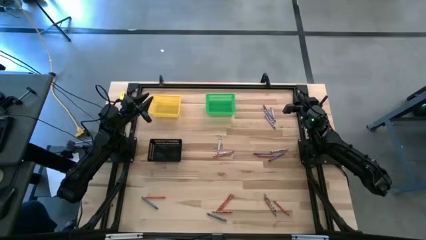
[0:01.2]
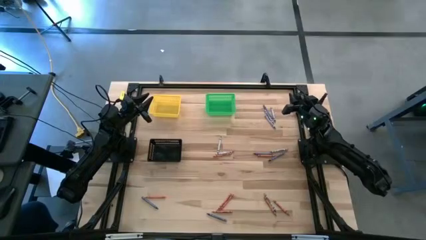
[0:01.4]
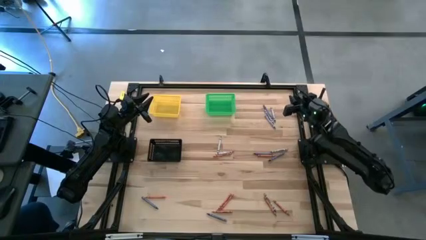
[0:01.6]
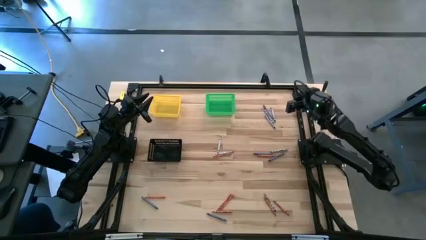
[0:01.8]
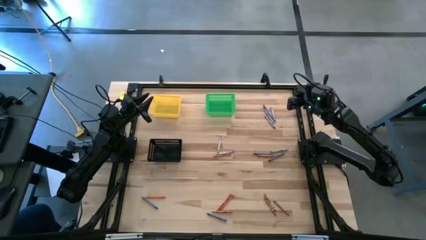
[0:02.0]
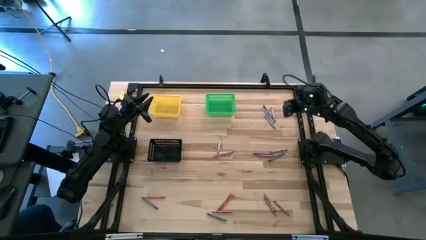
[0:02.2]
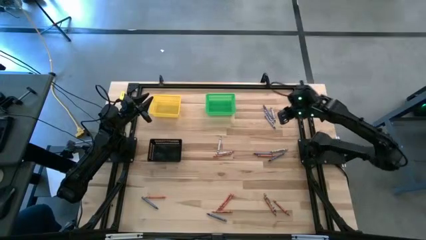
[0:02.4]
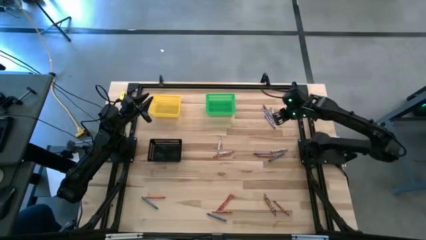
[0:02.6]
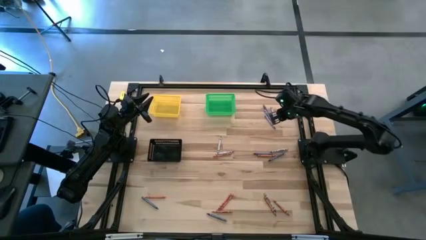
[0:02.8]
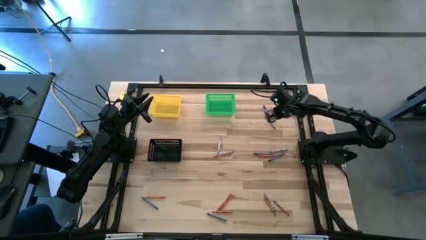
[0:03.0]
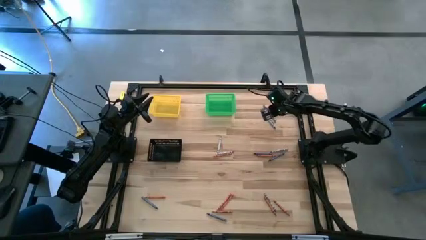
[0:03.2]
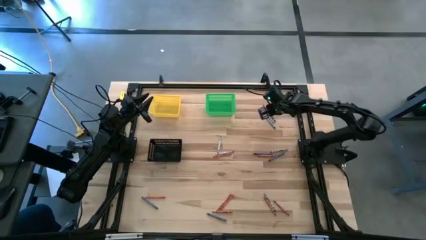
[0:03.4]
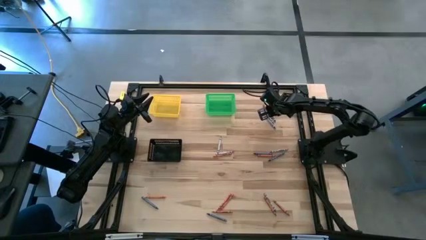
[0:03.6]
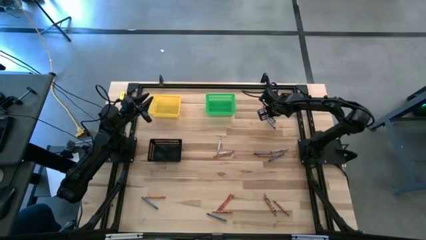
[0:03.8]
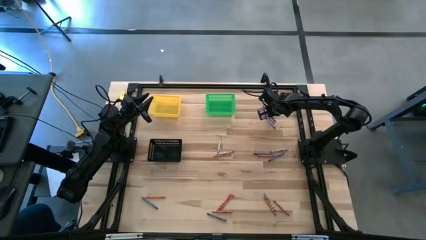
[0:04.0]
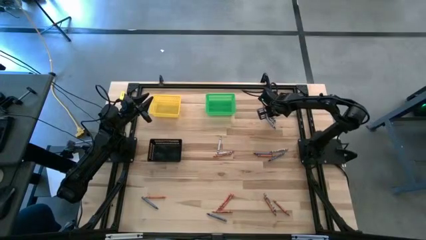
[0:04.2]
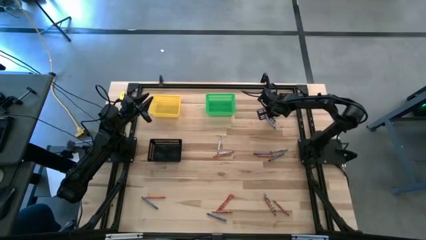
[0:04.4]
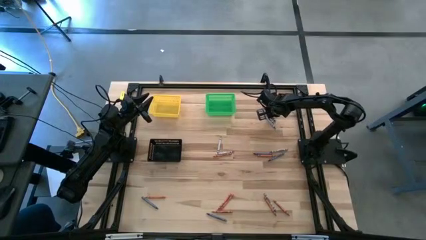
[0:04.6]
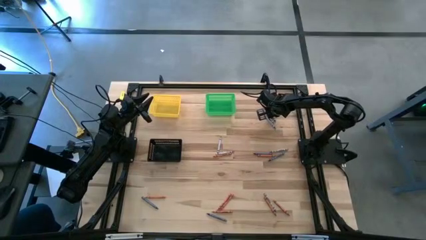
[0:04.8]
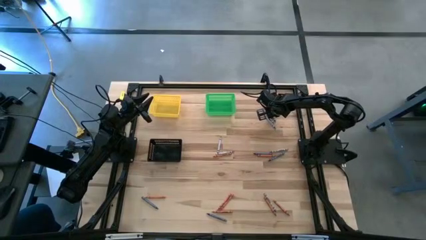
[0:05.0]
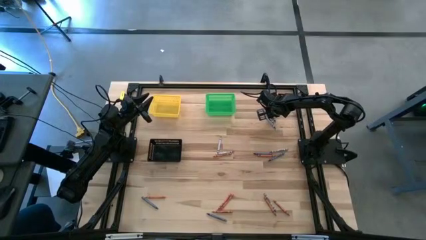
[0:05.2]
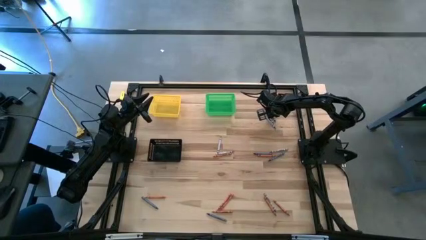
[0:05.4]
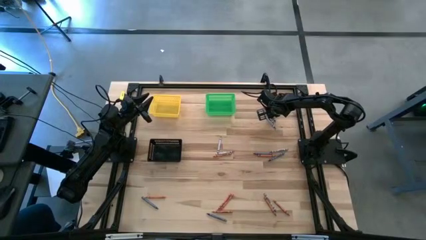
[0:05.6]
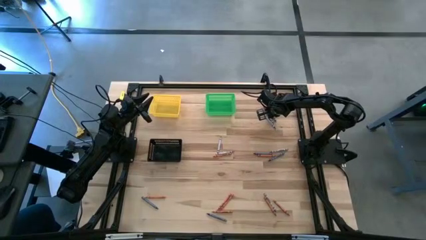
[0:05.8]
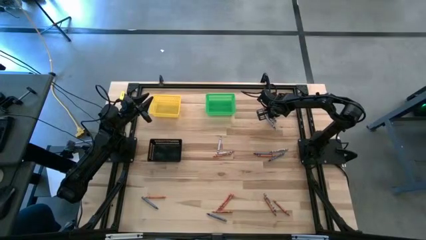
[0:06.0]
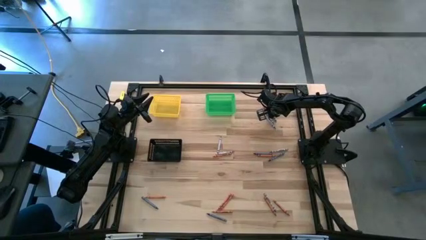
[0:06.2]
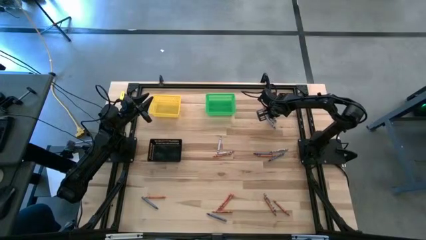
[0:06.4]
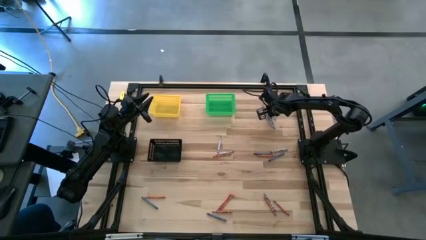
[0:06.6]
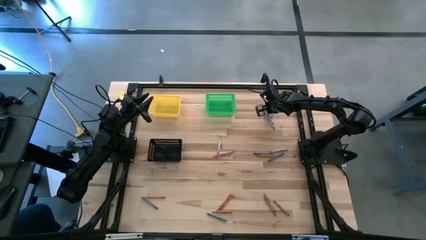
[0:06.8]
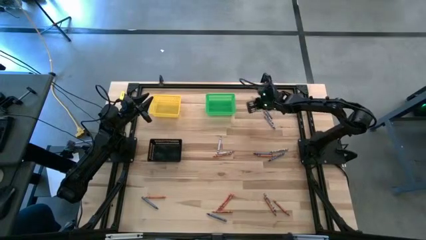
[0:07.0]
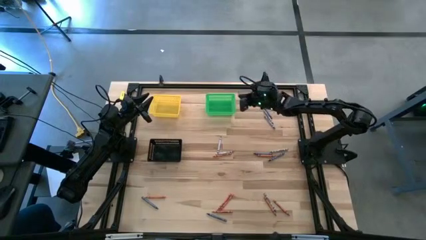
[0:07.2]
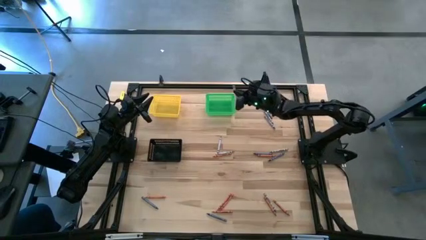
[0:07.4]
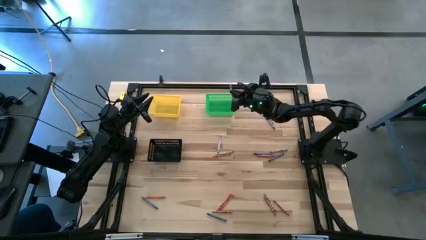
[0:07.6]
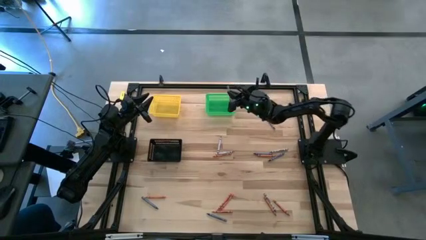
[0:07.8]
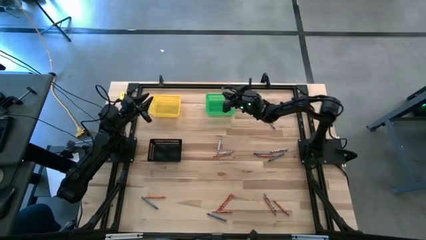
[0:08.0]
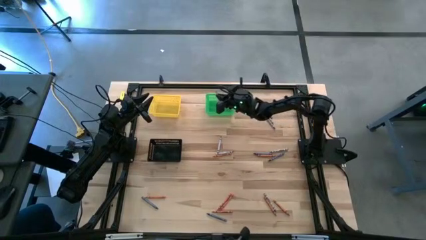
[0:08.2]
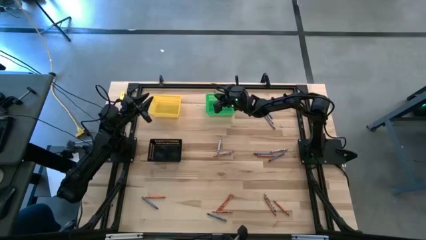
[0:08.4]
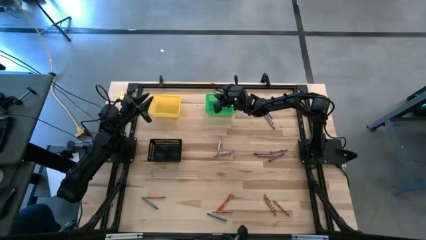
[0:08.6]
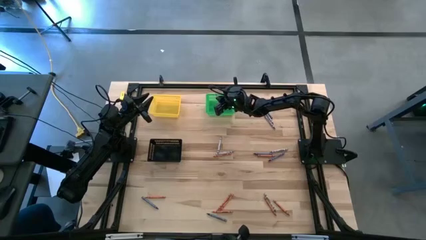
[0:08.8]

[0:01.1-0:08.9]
Task: Sort crayons
Put the gray crayon into the green bin

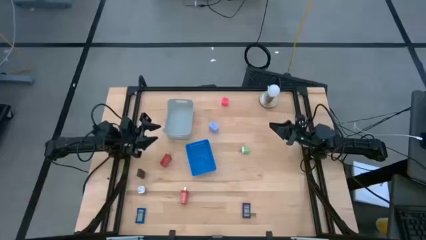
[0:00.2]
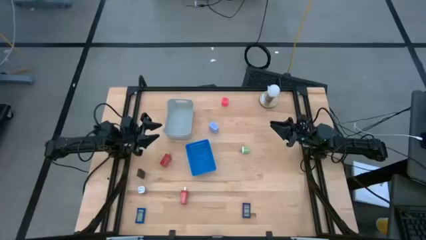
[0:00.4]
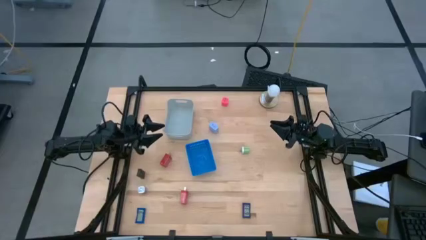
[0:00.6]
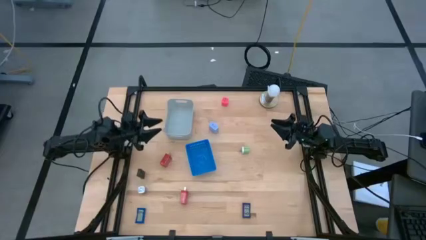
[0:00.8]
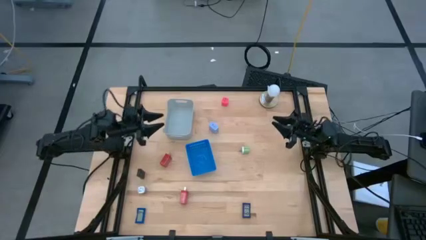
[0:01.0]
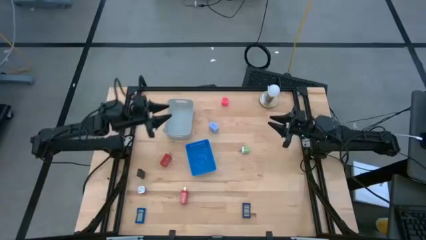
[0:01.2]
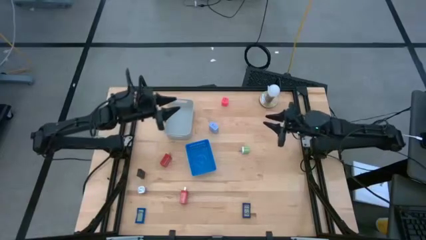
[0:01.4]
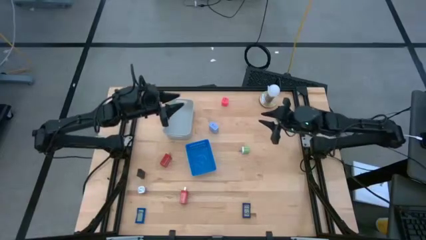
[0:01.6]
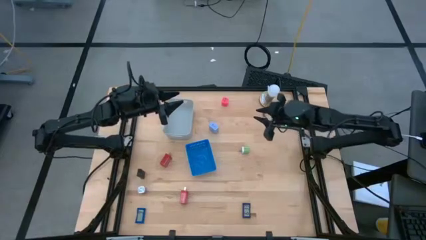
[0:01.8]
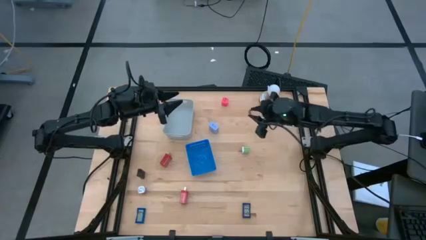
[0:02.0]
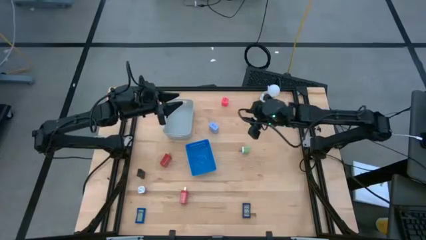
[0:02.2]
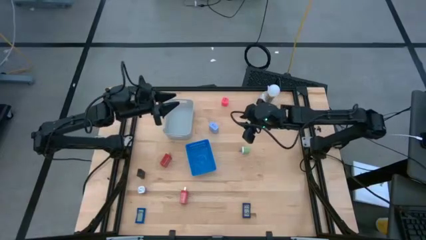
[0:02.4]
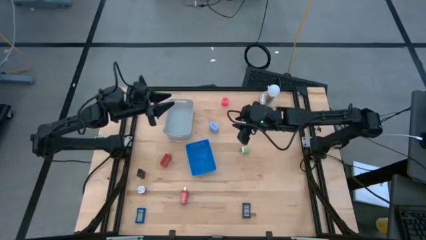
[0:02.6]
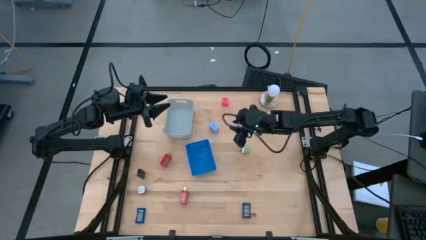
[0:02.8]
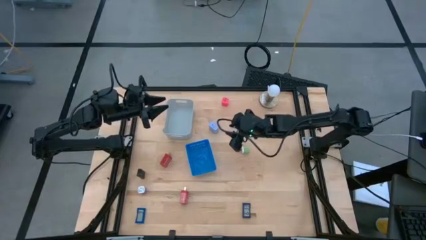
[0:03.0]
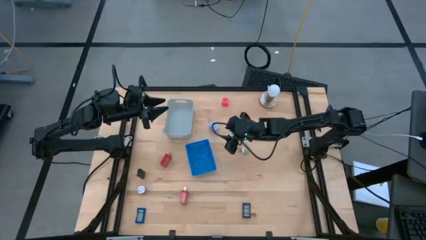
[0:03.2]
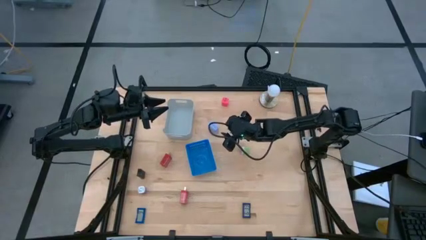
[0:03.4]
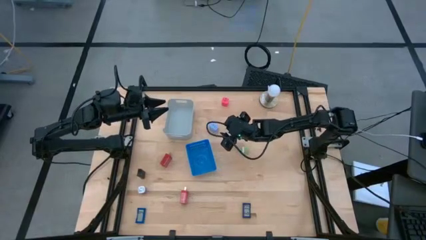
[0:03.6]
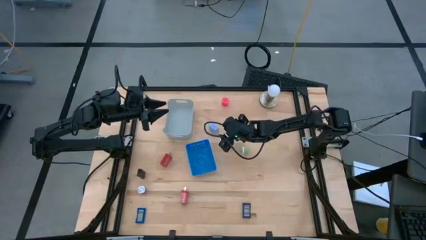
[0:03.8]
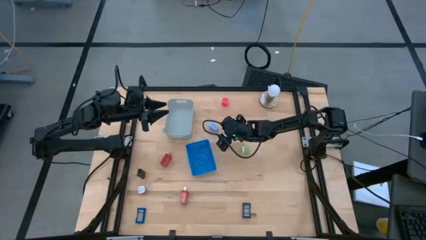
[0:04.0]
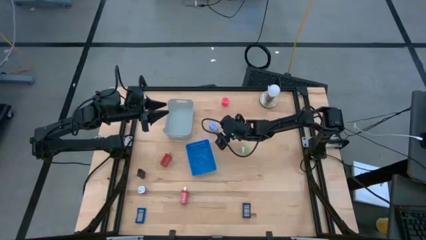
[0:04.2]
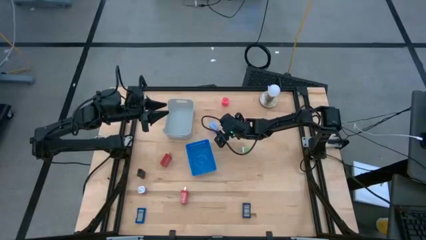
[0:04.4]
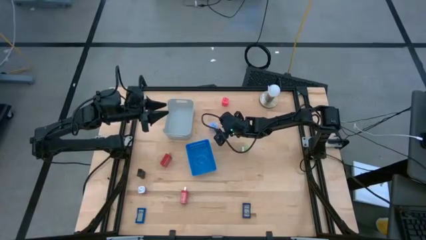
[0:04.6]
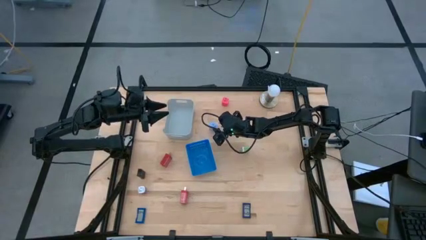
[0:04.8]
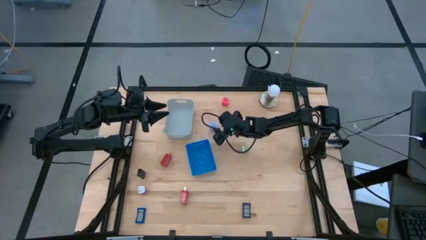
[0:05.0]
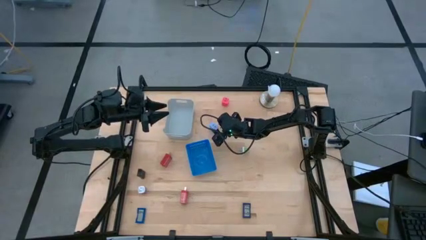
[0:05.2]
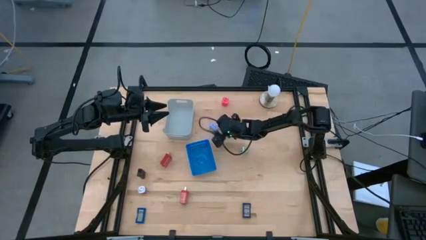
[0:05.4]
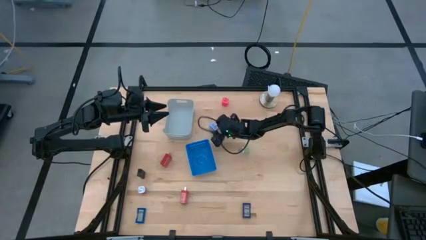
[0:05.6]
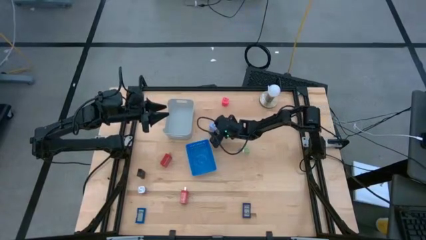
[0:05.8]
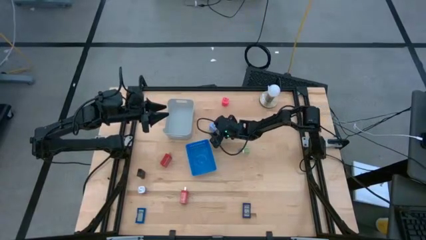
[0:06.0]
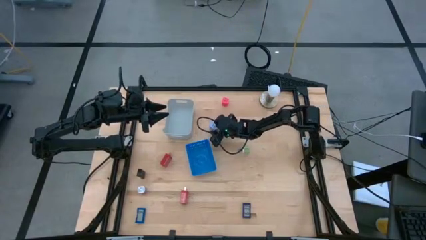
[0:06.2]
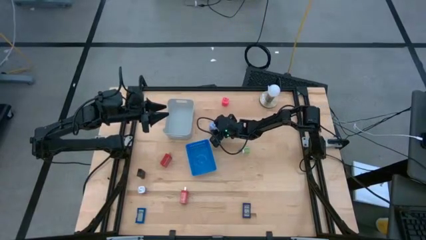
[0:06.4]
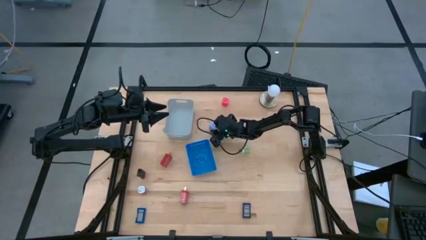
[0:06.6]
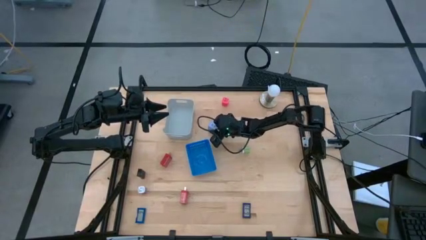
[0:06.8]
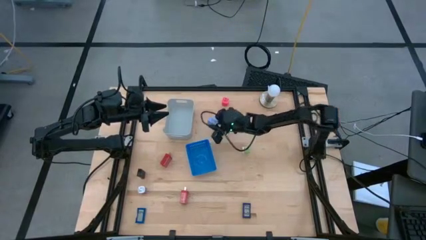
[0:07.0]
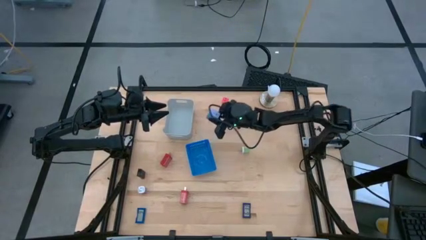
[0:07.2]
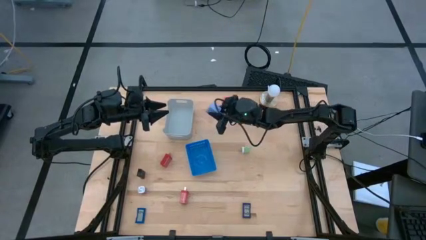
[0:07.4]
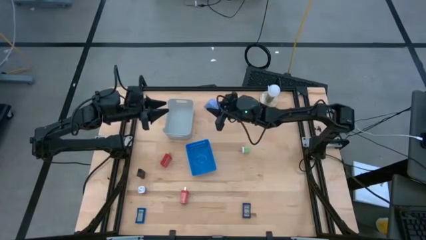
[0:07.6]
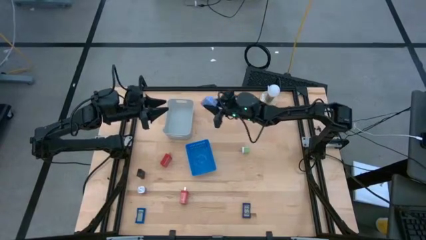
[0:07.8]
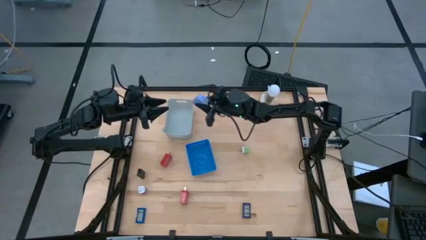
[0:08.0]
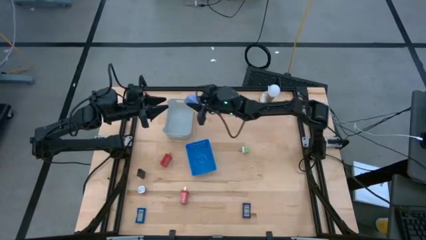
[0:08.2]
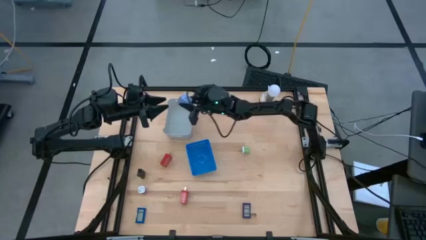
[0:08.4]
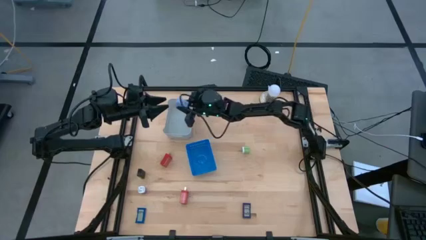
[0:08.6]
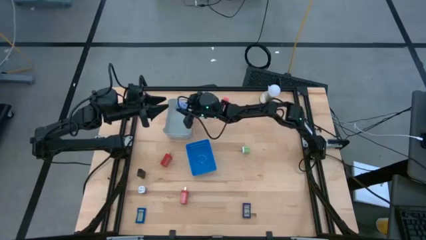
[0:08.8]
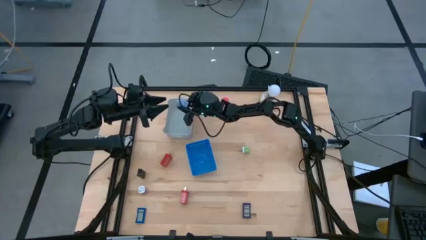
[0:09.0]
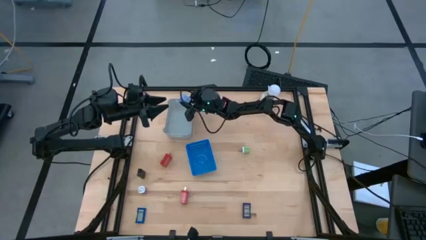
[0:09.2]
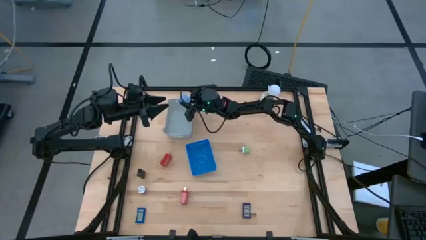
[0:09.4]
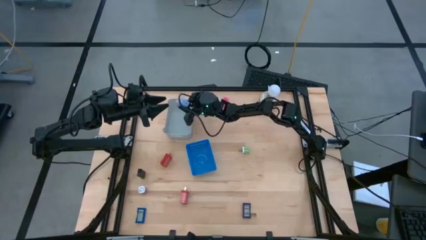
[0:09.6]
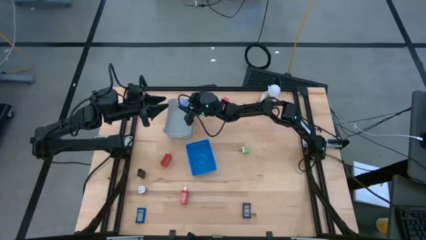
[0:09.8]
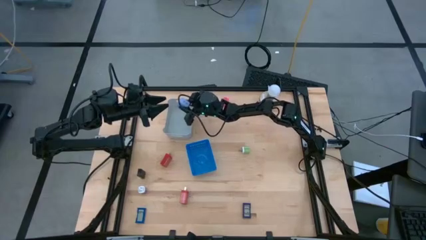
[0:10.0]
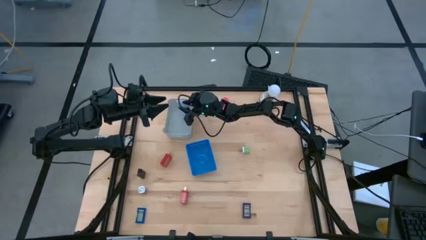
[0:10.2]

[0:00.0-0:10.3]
Task: Pick & Place Office items
Put the light blue charger adapter into the gray bin
